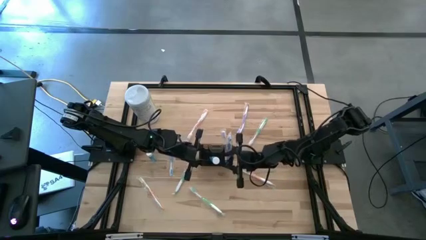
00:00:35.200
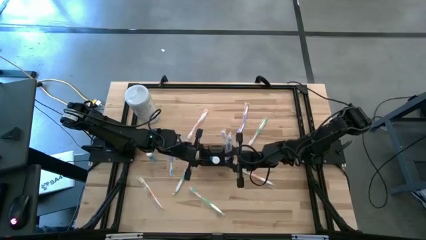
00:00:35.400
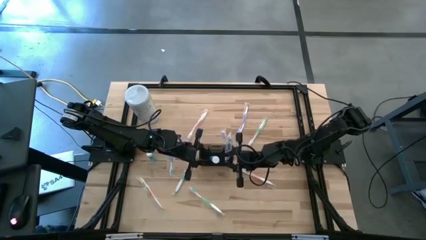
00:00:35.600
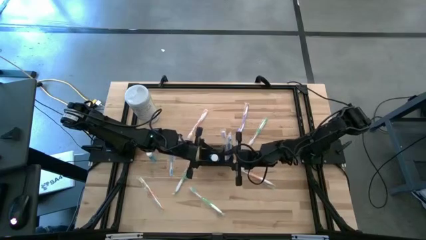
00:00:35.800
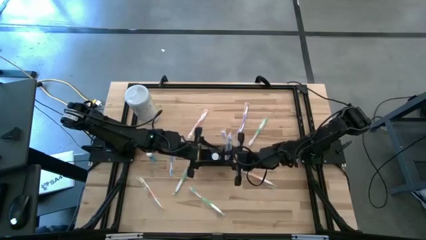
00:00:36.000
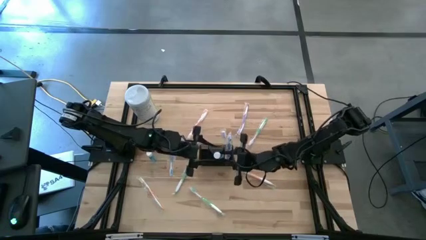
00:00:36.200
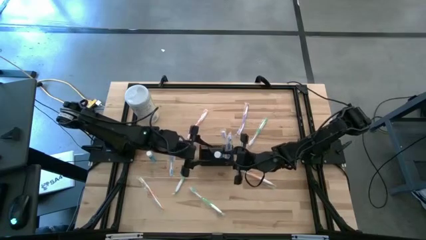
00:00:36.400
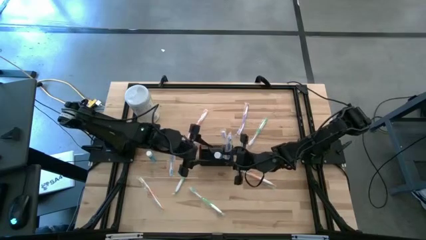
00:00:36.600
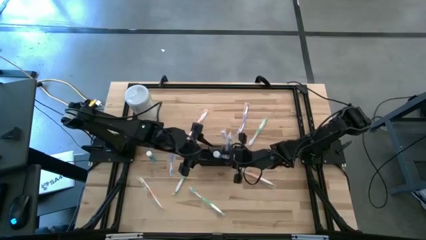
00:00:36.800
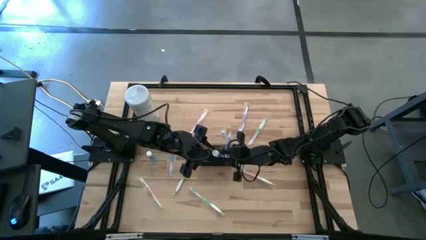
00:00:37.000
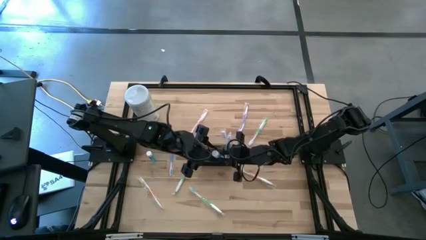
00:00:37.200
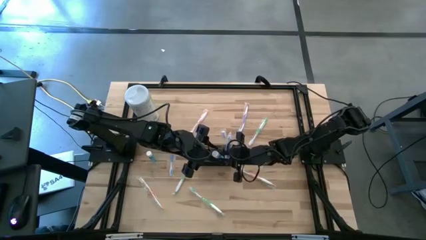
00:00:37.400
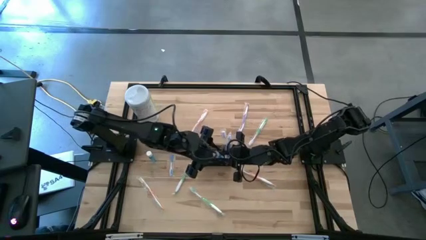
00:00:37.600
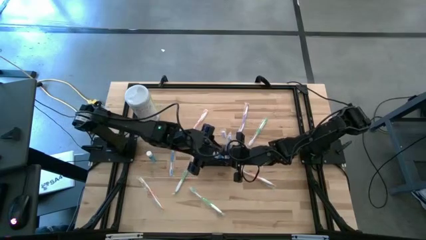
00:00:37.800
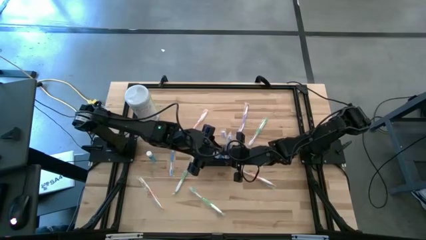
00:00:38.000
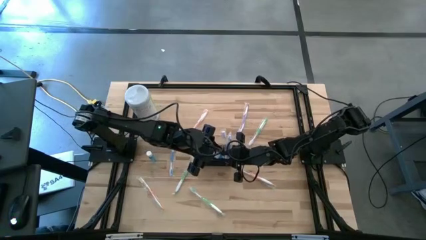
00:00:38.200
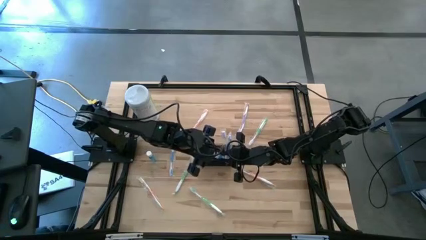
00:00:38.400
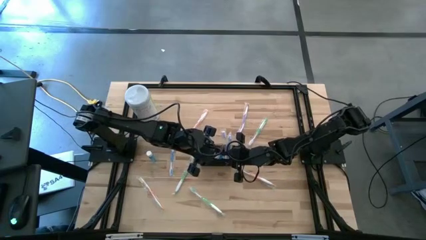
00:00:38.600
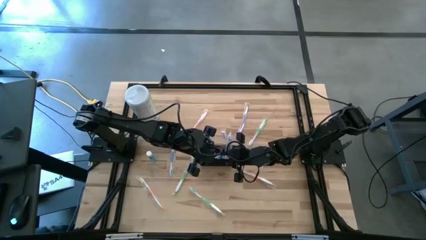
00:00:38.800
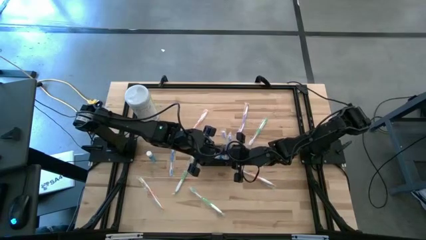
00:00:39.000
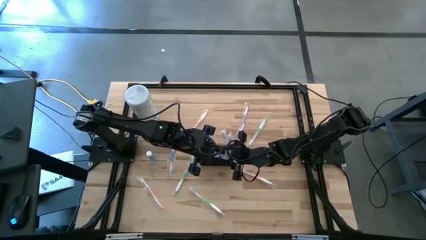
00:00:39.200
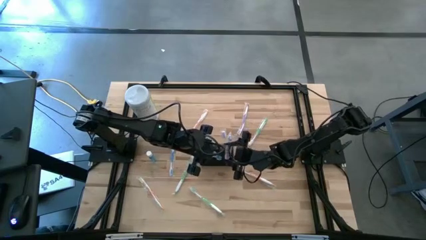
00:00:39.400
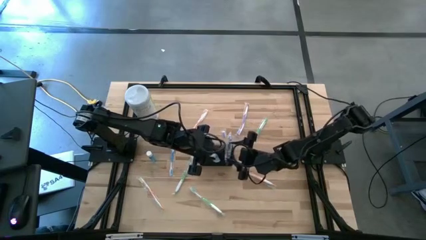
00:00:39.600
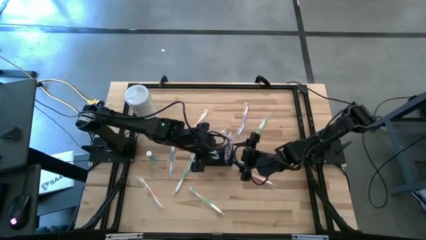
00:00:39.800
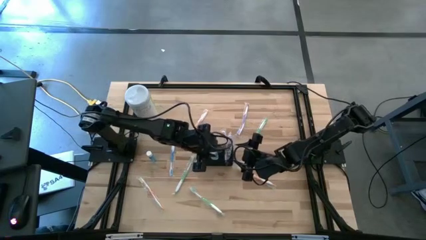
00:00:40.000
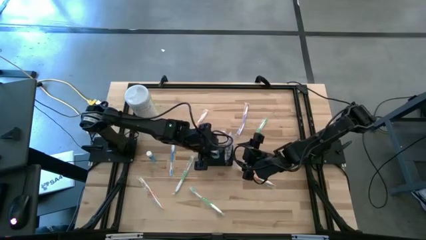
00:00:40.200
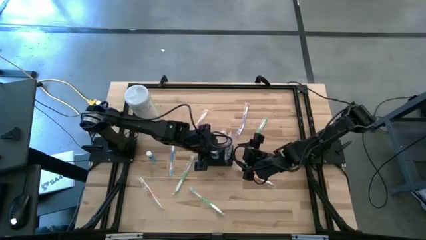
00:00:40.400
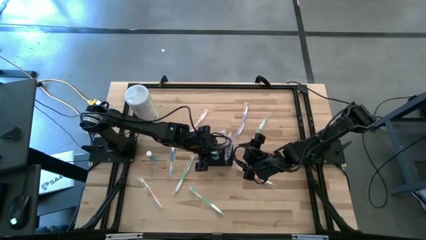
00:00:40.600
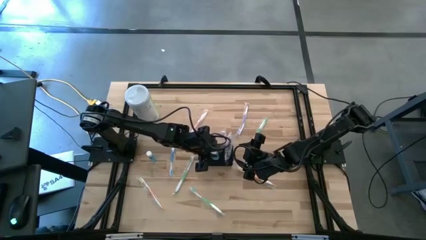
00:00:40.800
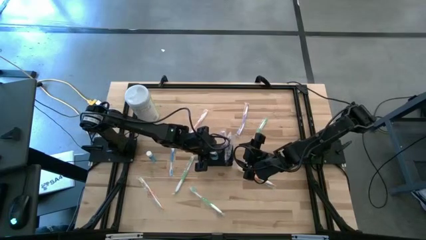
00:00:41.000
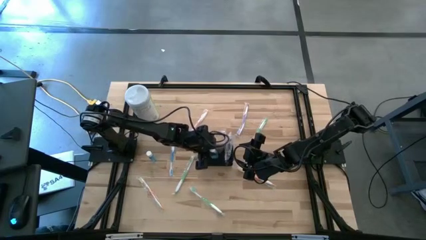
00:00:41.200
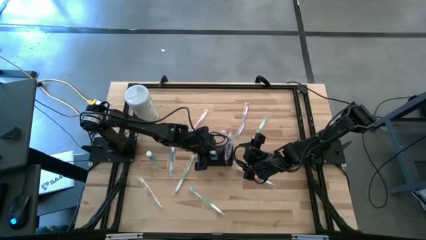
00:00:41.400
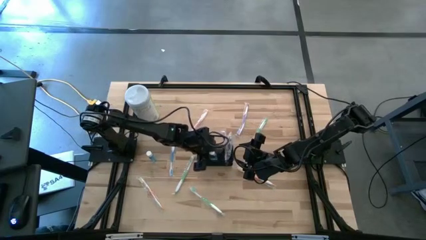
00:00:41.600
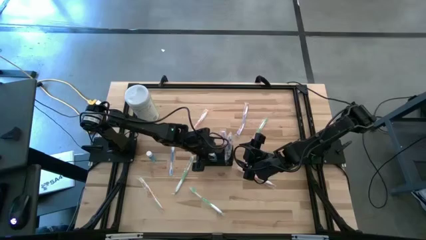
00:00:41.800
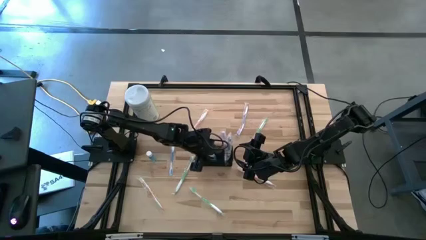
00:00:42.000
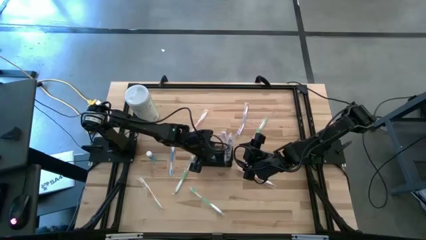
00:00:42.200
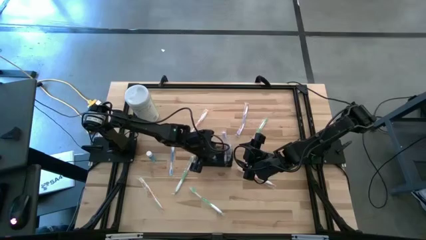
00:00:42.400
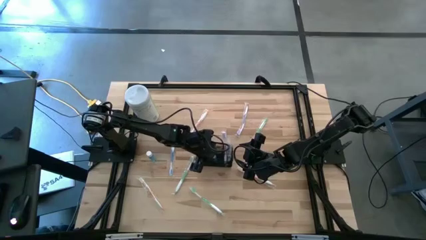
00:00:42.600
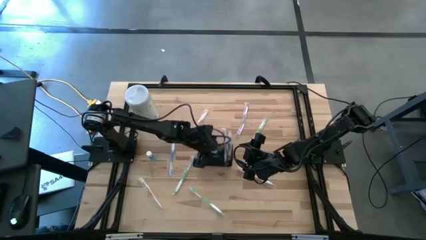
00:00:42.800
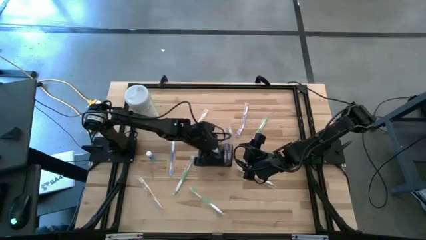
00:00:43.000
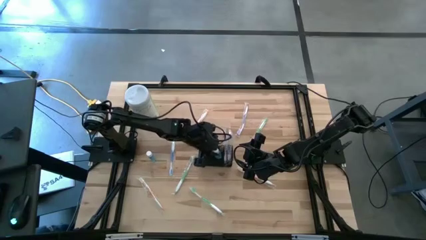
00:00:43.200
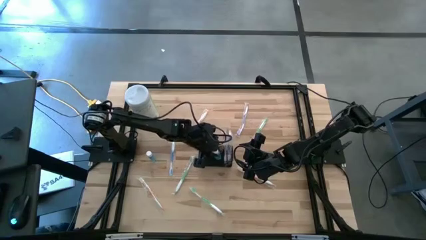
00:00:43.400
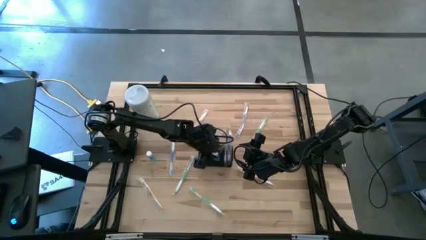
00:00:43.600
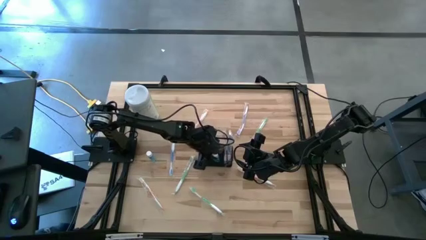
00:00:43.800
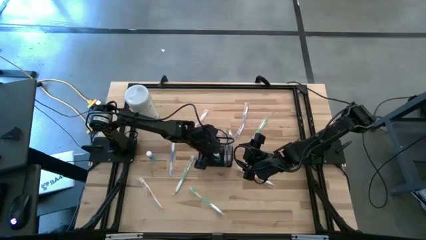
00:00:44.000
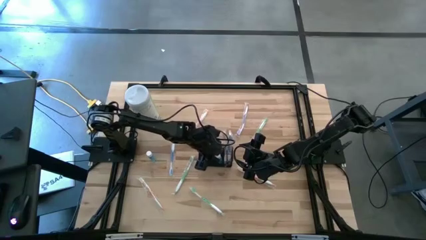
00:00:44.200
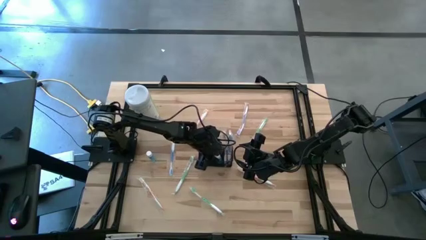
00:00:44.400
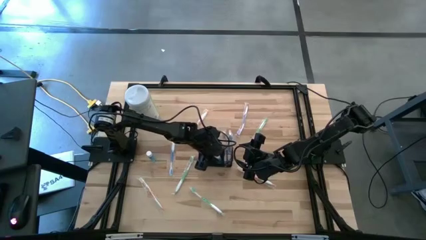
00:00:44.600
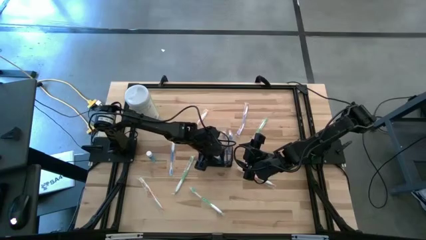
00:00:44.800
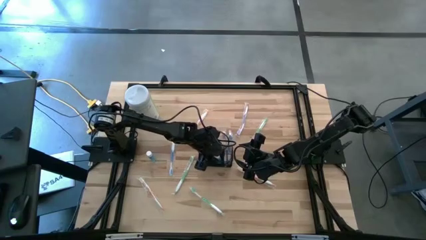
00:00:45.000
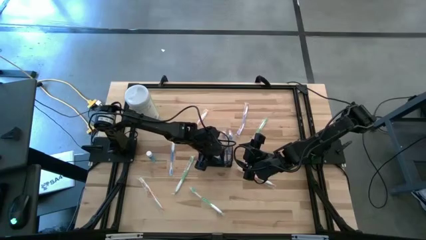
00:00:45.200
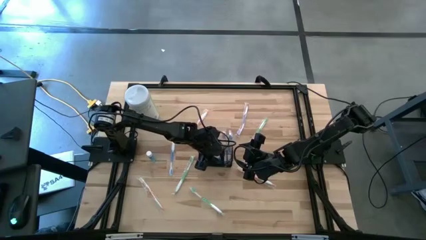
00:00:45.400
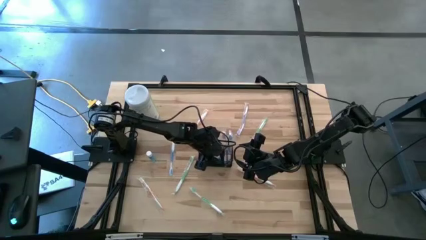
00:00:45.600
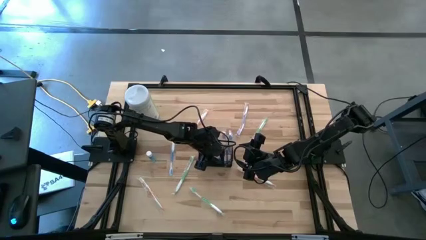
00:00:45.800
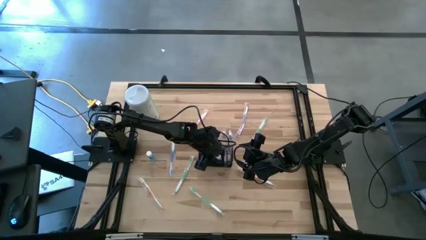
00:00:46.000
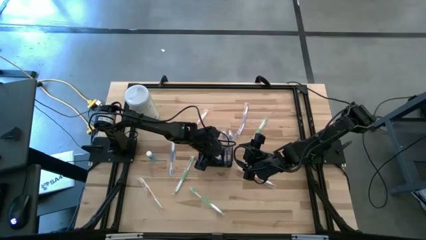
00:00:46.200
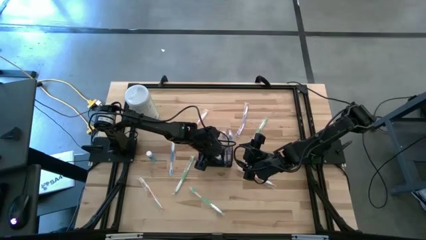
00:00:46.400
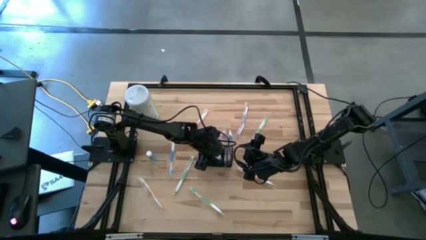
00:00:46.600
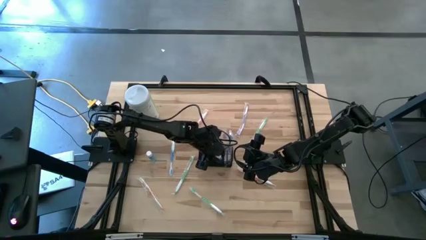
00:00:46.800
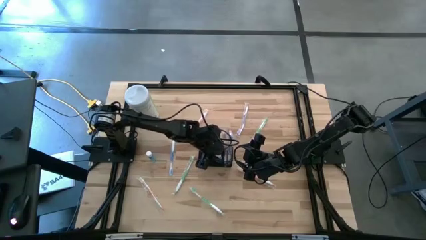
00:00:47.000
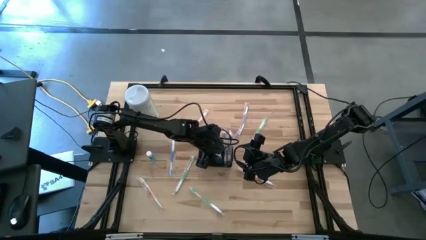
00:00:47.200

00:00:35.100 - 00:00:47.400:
Task: Pick & Place toothbrushing station
Put the right blue mouthwash into the black mesh
